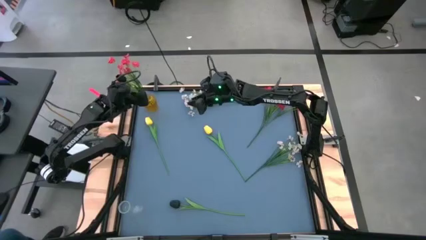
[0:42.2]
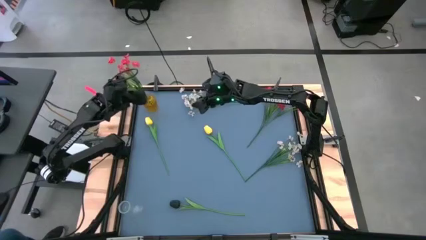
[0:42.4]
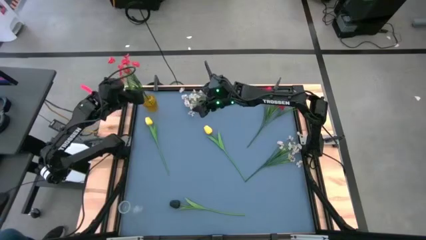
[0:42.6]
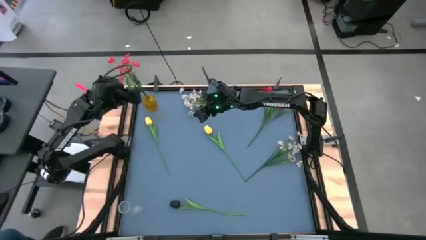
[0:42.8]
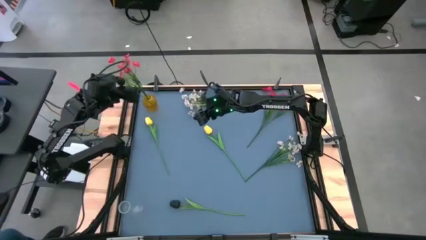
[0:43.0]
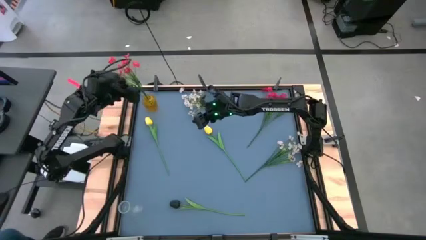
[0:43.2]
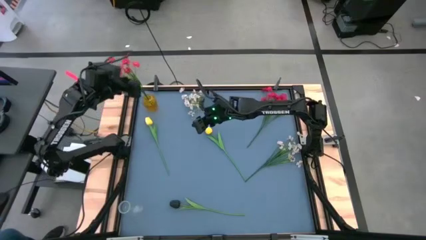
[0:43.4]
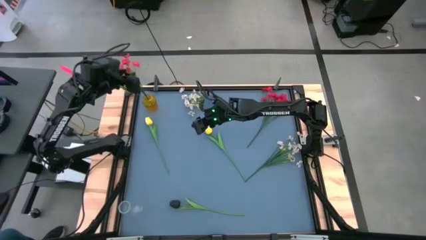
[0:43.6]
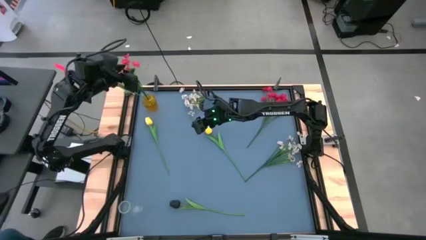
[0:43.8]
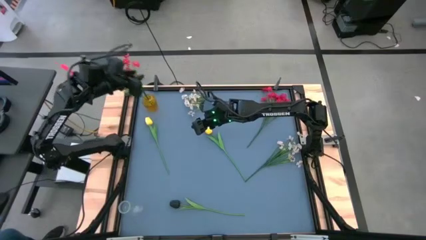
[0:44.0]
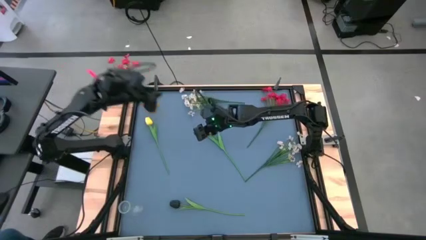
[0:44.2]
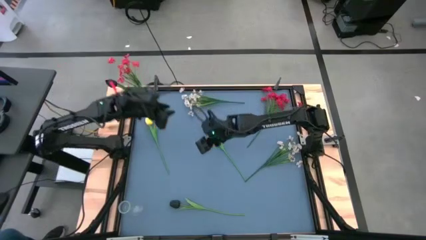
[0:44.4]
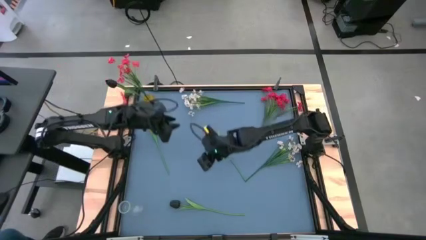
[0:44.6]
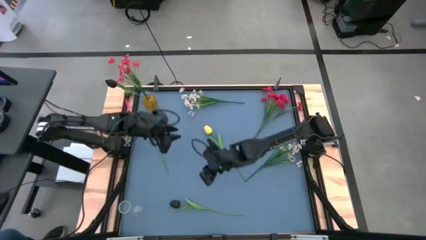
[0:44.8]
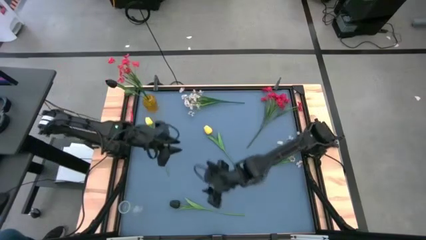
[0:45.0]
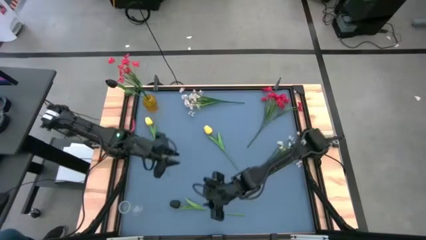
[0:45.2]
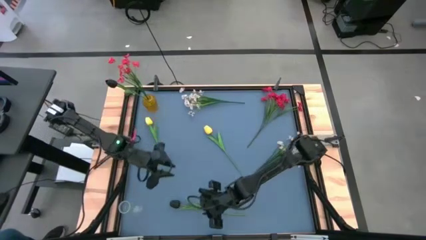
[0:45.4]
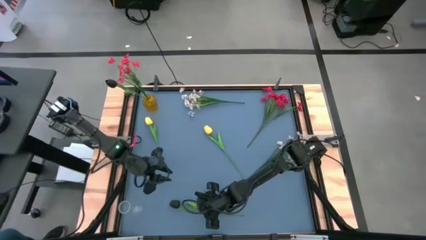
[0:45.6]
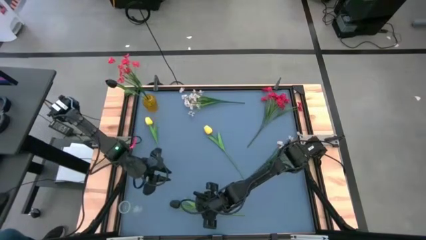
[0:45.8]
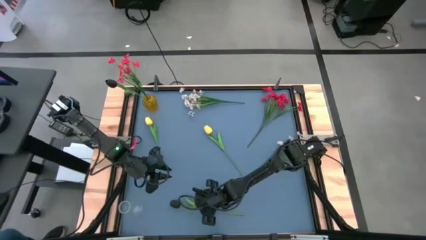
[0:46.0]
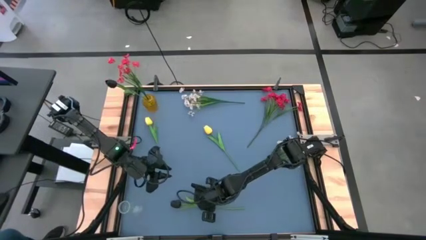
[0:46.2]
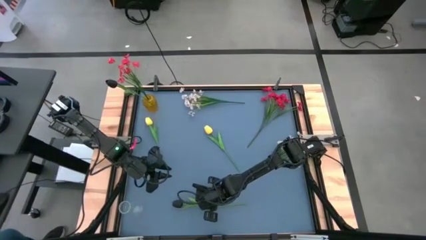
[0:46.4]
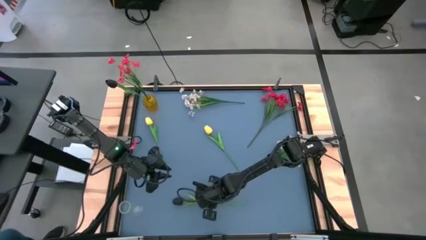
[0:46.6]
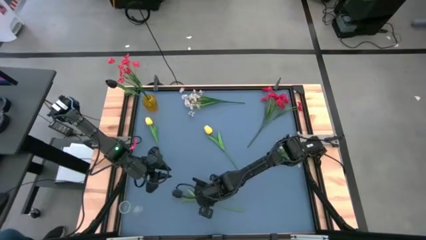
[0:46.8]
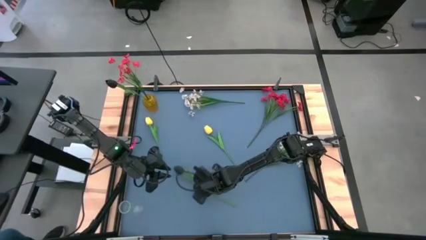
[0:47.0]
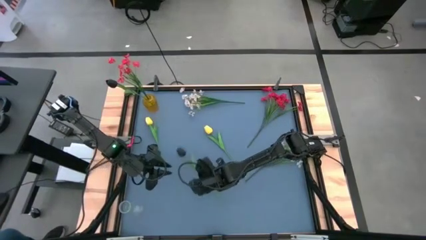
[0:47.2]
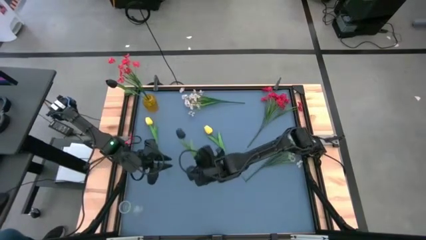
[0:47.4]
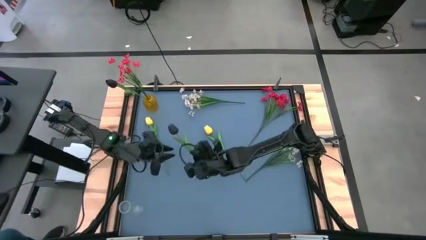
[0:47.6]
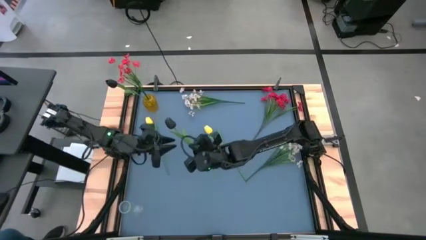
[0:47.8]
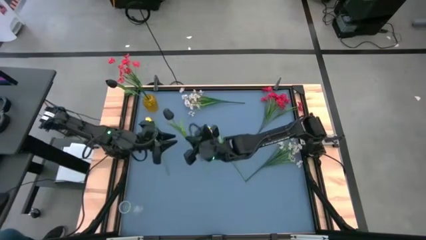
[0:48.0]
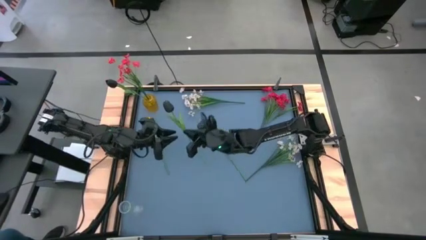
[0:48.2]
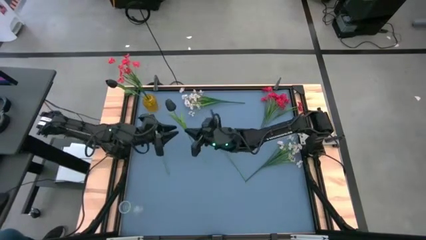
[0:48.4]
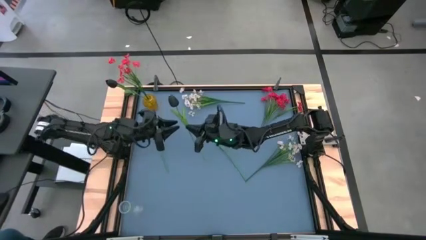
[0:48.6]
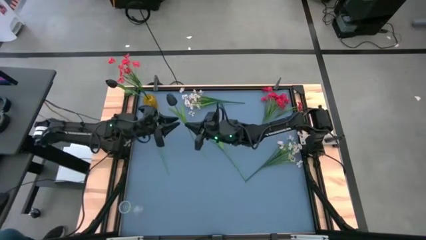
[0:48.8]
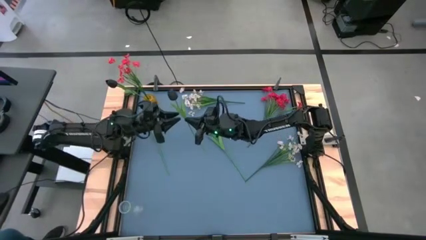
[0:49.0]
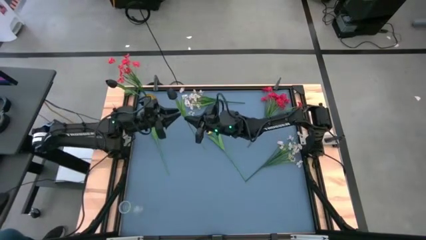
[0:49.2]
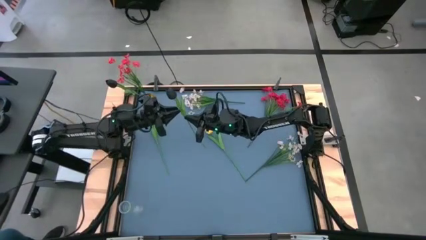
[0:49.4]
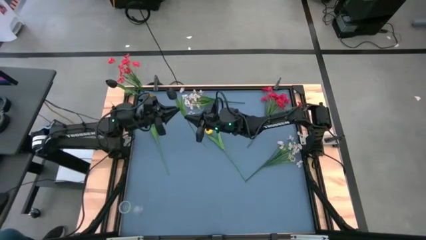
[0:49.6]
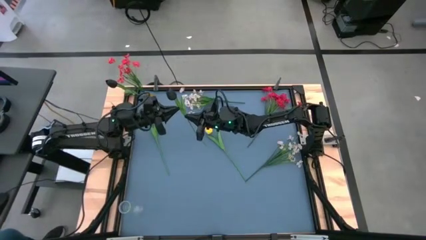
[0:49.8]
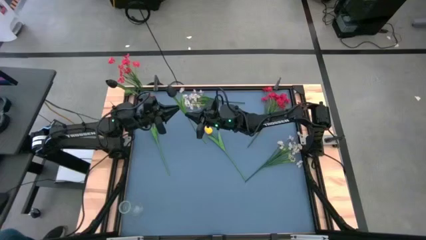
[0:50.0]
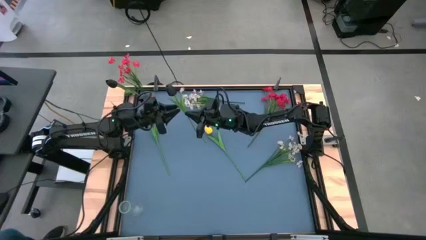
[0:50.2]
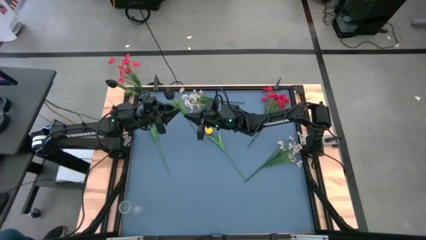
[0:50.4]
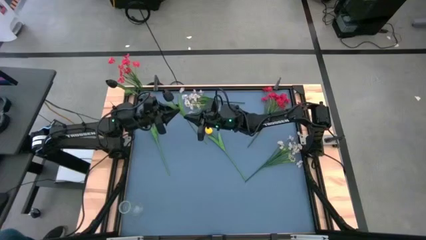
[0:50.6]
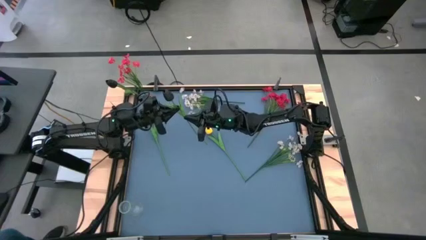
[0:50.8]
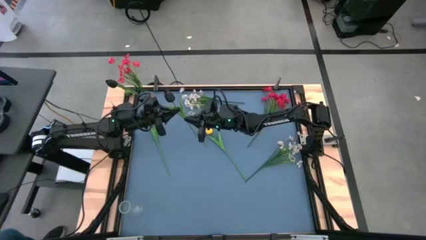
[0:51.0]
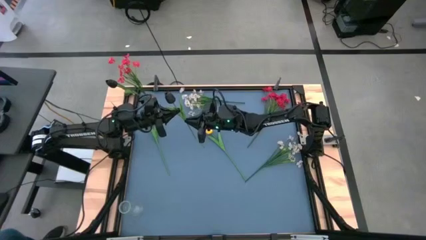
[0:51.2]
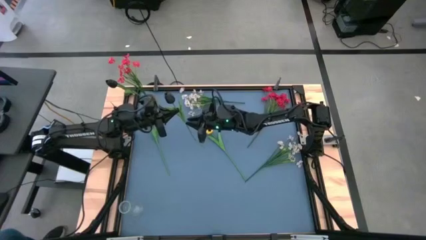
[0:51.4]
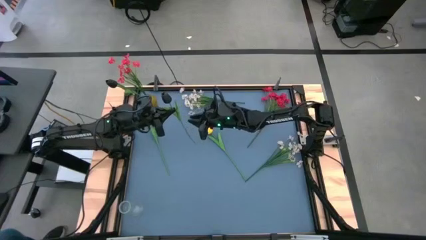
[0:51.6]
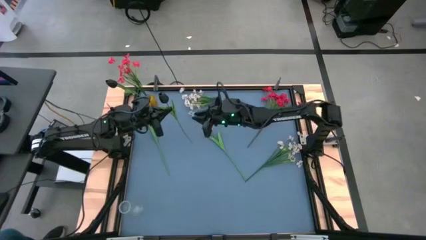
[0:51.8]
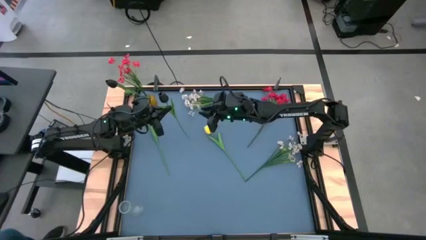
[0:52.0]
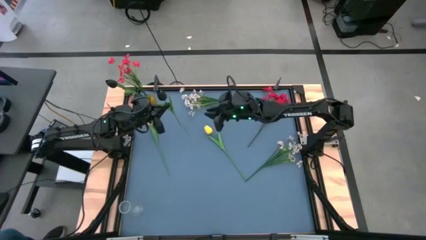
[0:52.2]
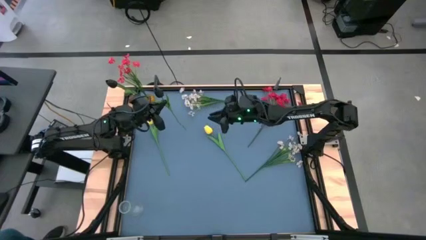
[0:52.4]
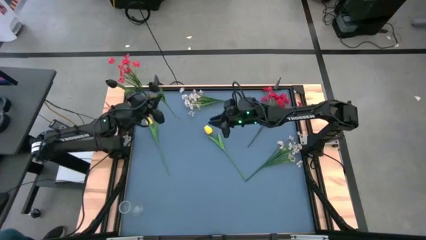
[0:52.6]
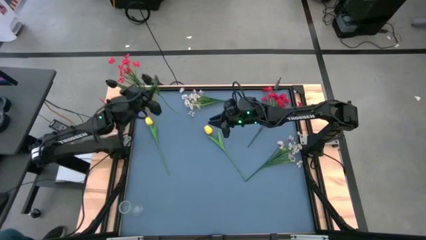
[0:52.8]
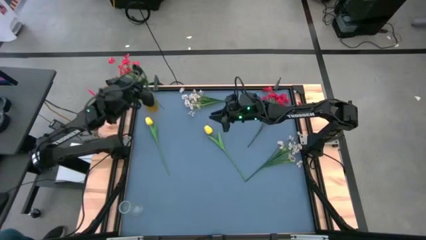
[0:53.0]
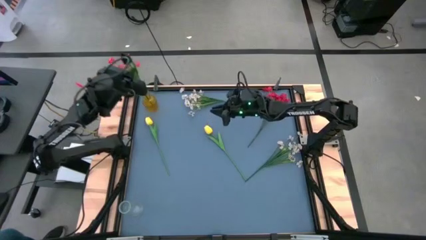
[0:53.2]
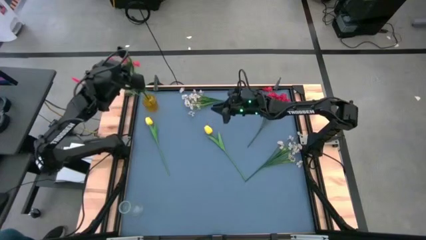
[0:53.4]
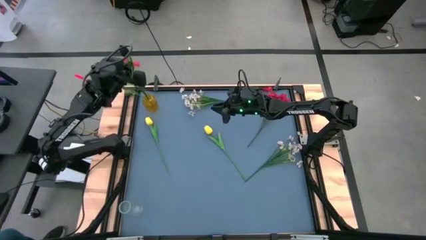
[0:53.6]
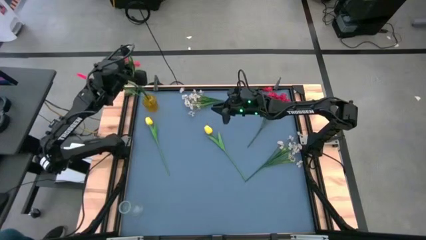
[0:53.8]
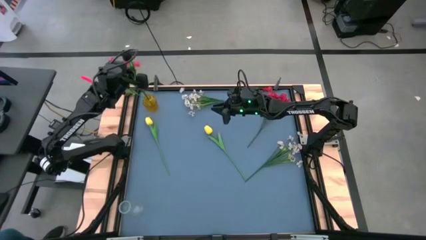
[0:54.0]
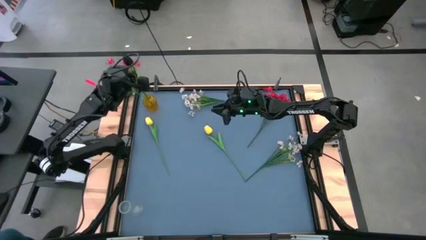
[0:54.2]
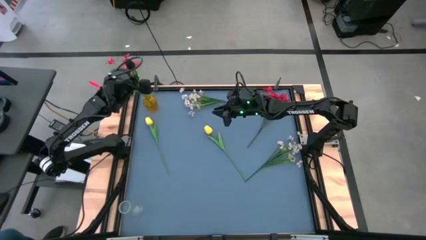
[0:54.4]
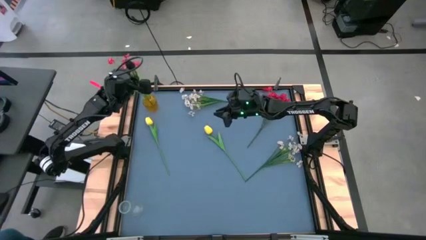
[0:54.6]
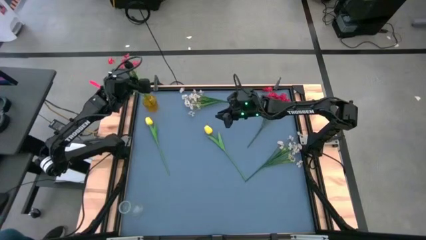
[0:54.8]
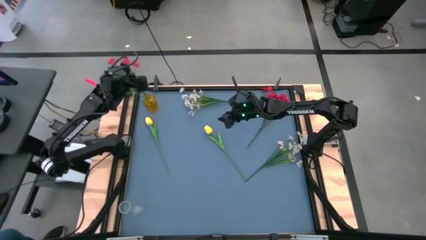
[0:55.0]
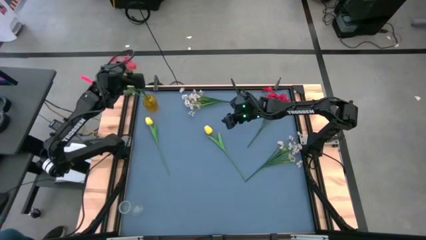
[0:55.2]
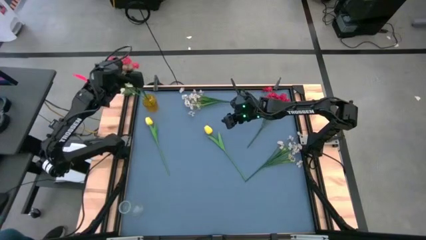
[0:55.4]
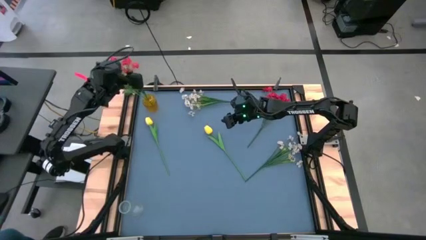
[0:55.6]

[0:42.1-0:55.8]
Task: Sort flowers into vase by color
Put the black flower into the yellow vase
